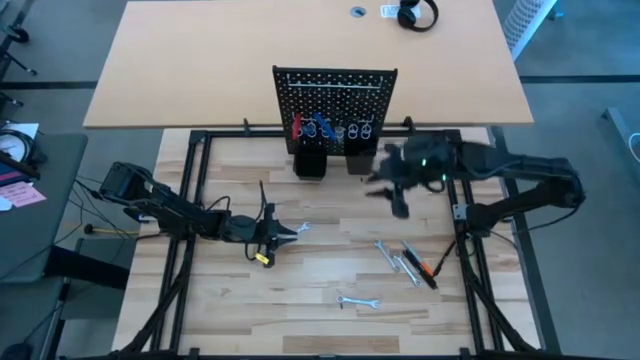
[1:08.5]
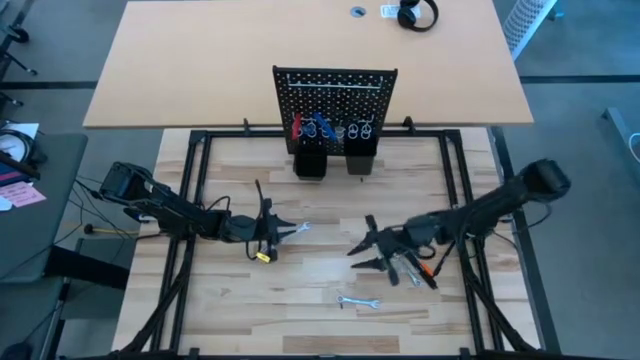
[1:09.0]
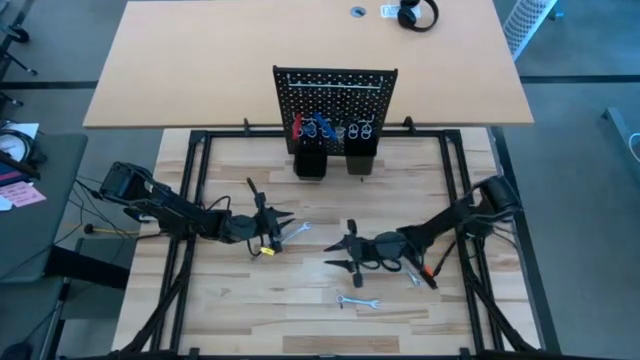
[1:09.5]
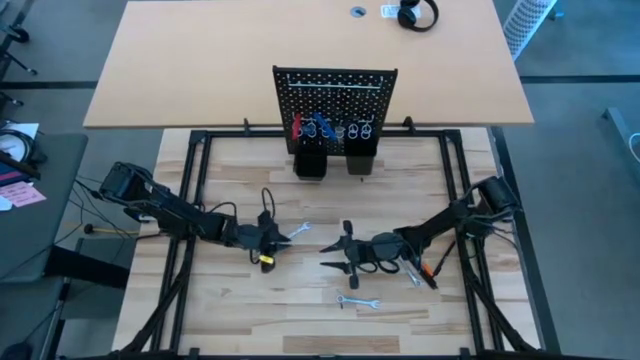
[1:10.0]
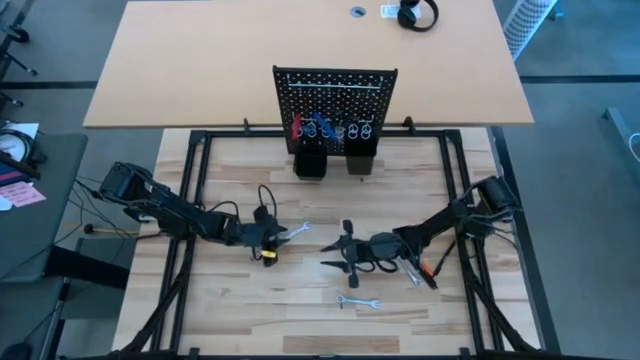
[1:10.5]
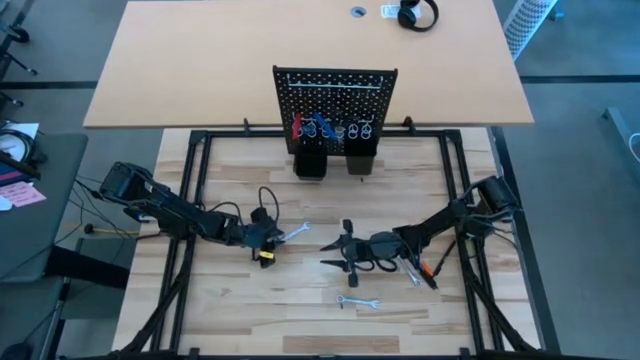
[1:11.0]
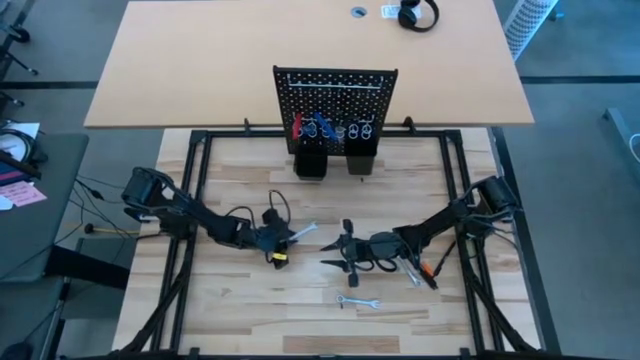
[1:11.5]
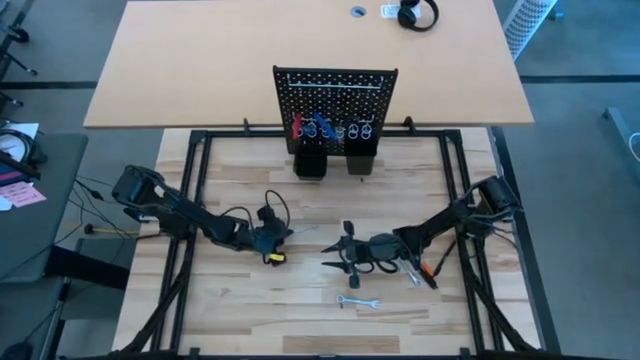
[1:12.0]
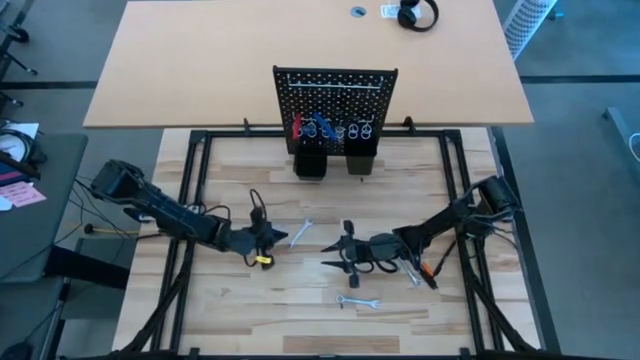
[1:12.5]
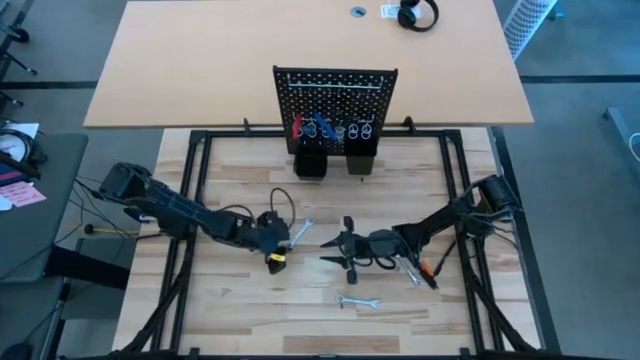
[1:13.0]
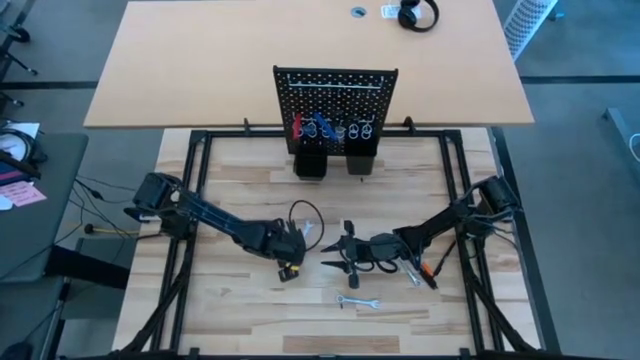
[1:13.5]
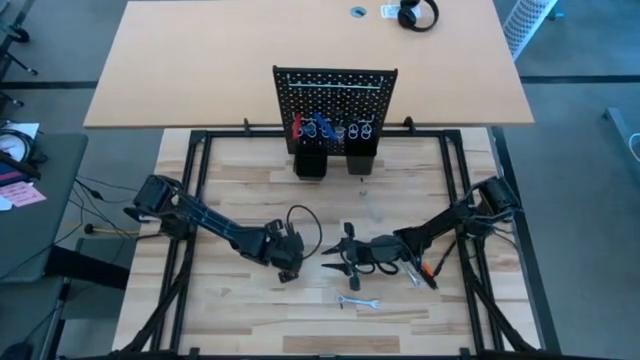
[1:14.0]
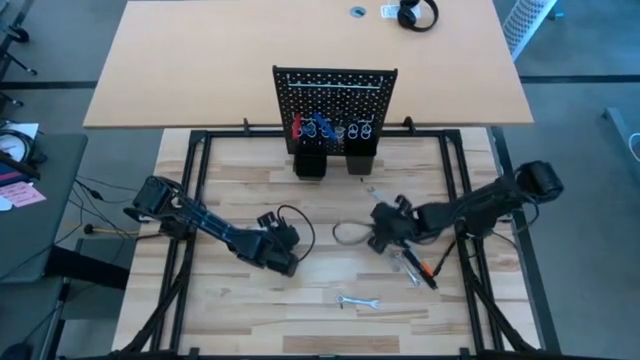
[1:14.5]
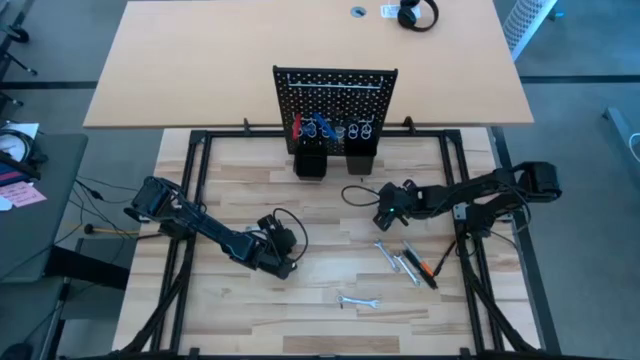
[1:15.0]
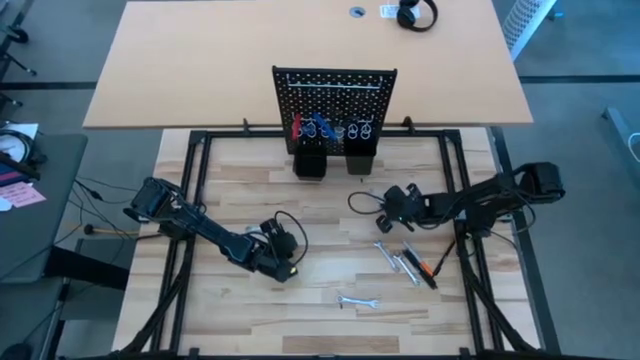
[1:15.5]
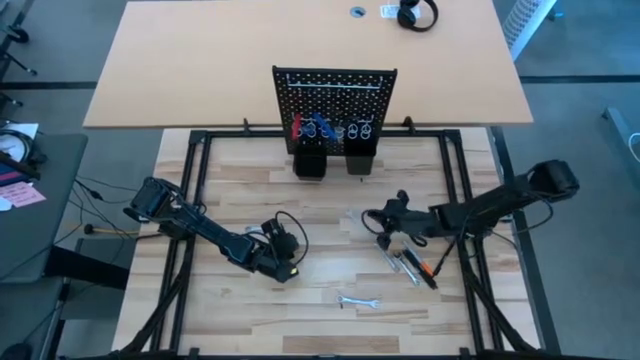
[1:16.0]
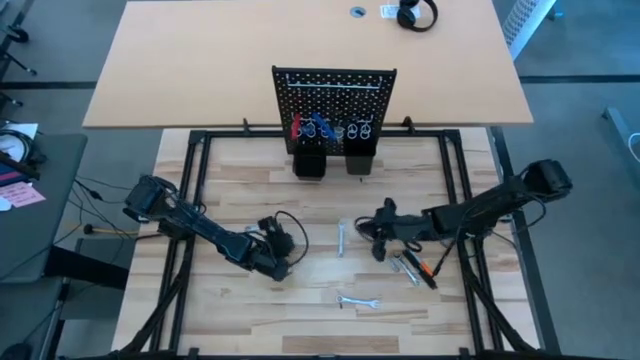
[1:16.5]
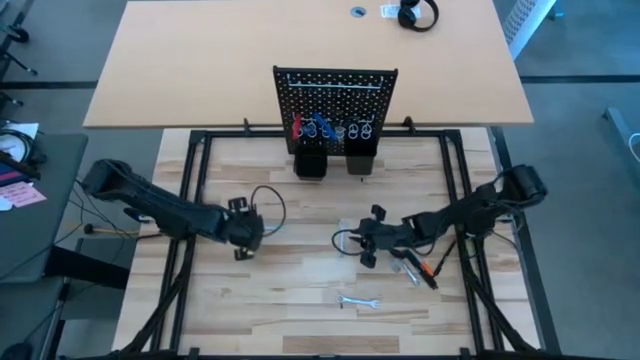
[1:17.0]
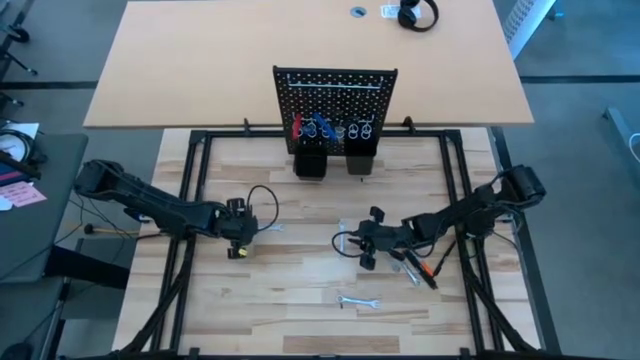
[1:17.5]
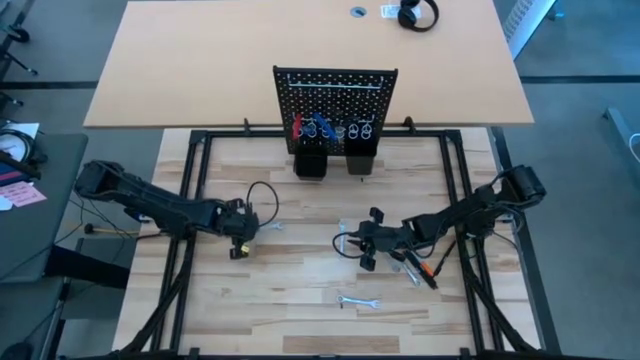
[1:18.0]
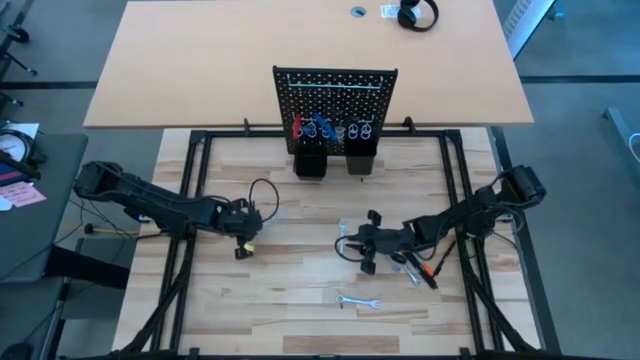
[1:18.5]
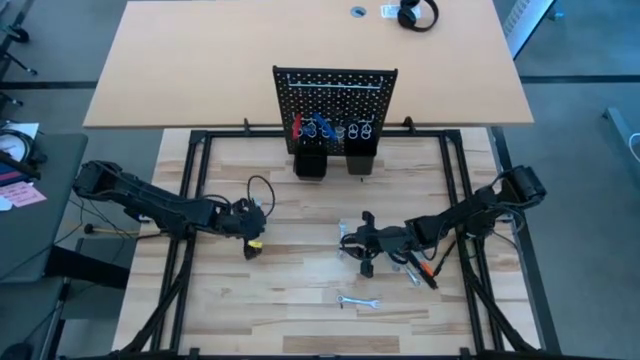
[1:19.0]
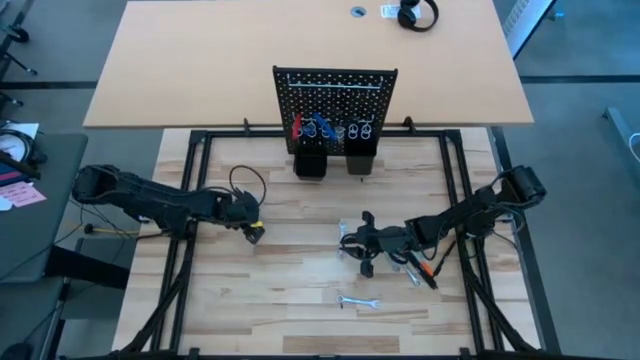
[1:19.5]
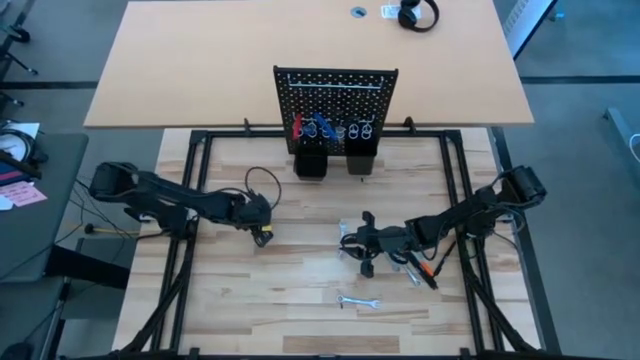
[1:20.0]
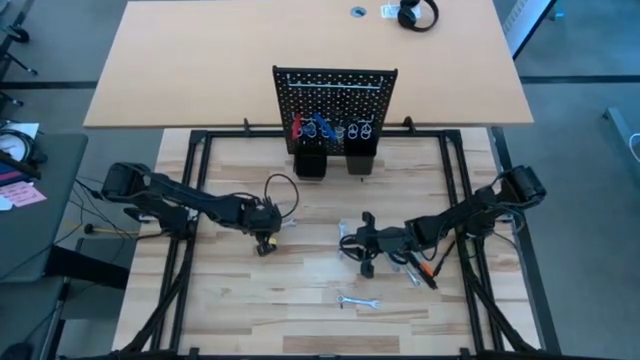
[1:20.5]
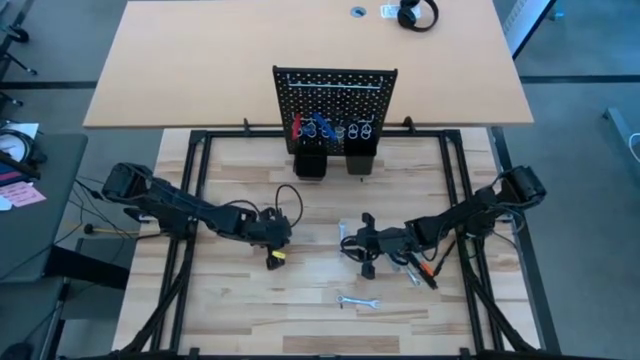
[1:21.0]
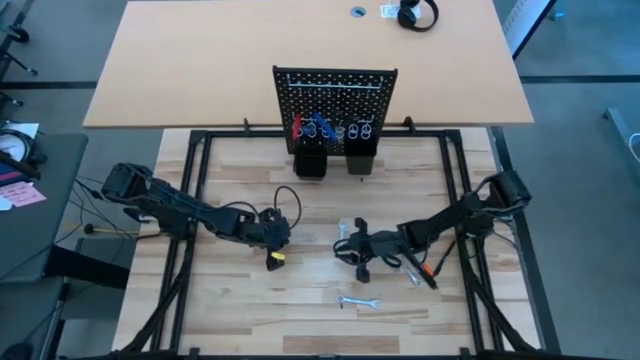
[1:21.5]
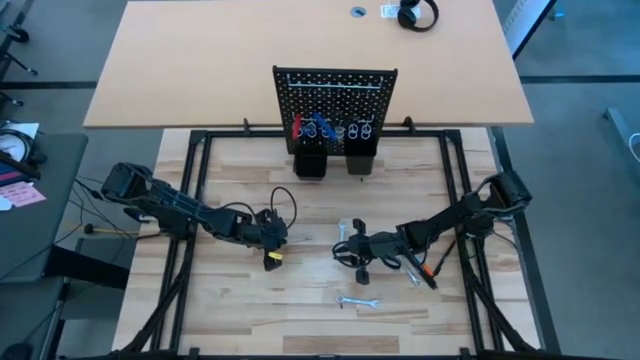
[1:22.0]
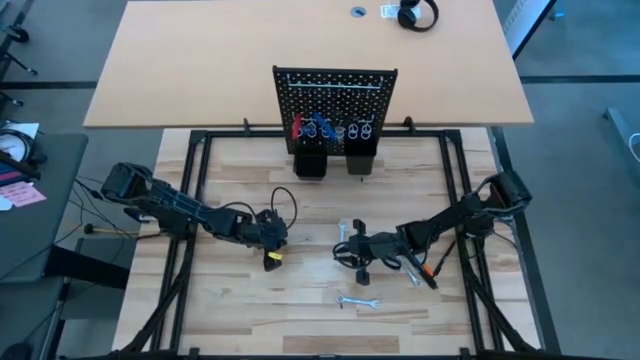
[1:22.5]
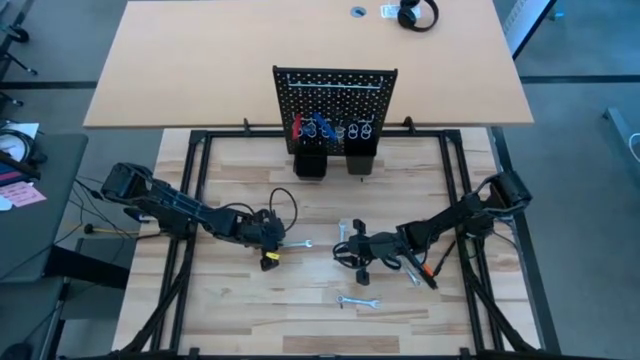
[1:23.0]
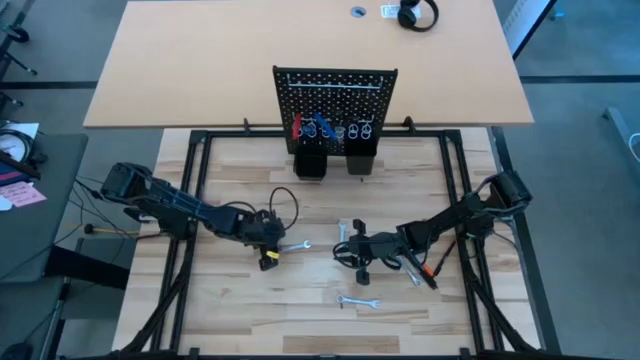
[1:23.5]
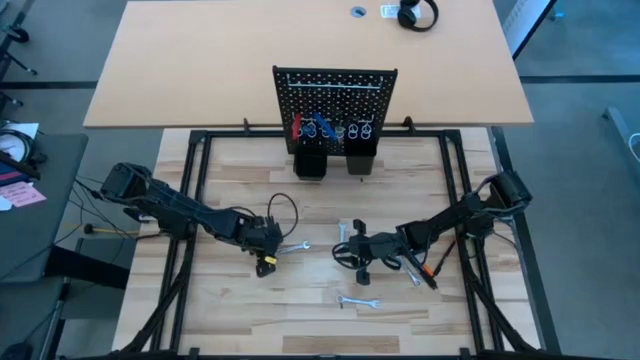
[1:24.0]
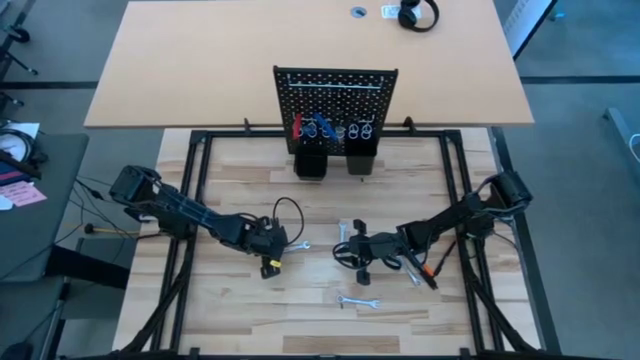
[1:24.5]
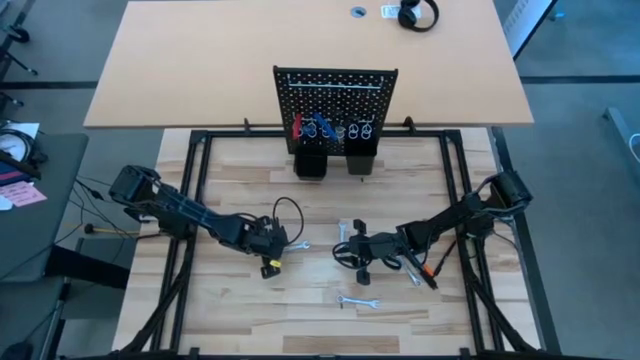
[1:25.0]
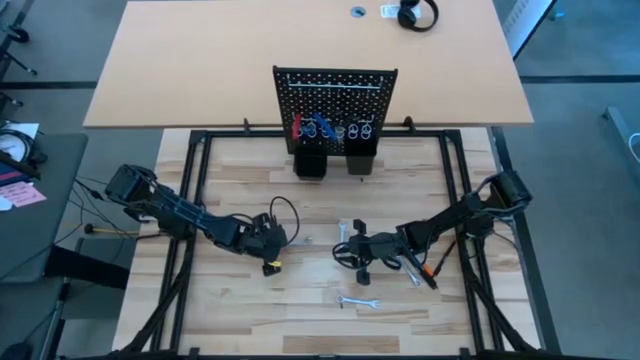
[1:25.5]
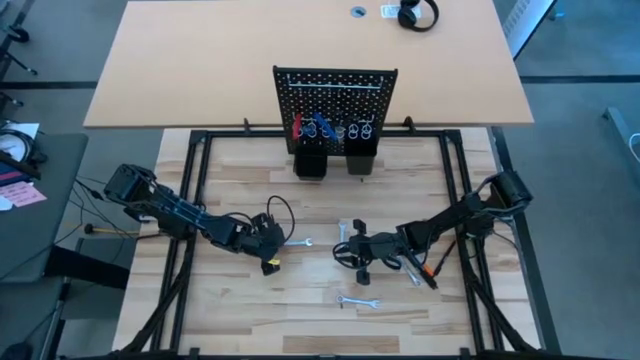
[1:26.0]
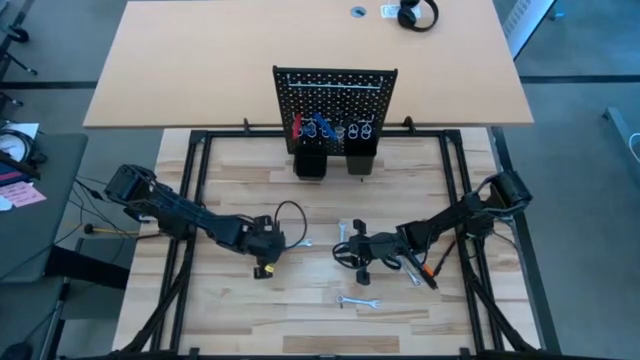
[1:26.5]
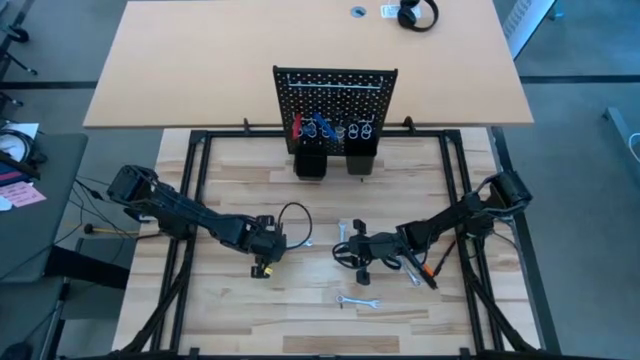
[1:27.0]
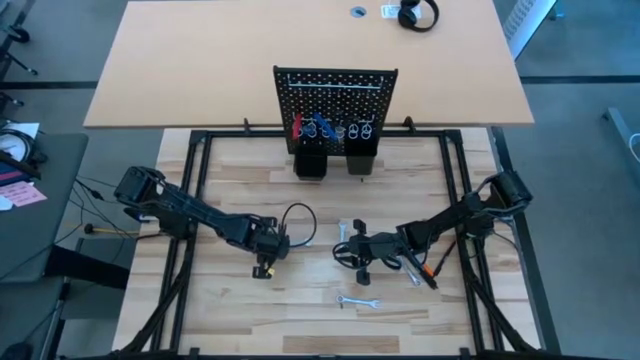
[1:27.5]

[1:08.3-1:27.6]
Task: Hang tools onto peg board
Hang the wrench on the pegboard
